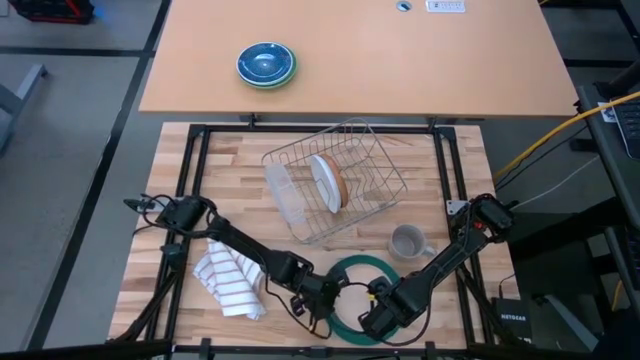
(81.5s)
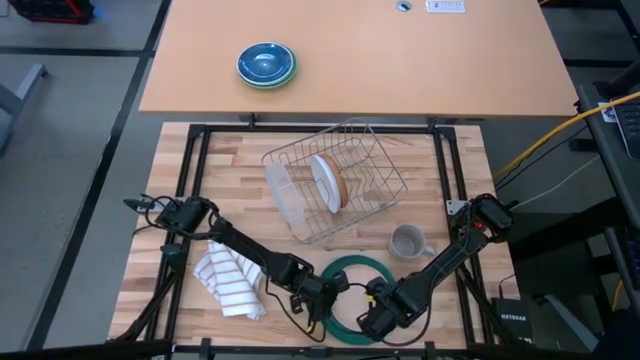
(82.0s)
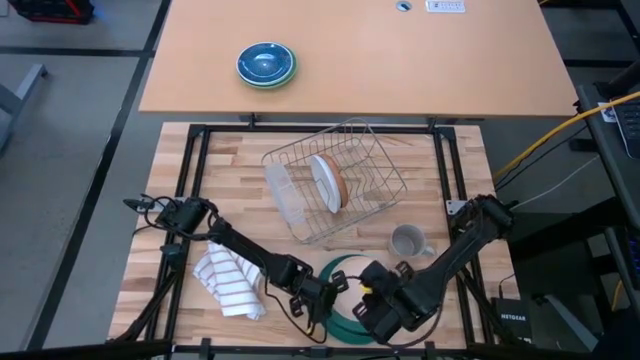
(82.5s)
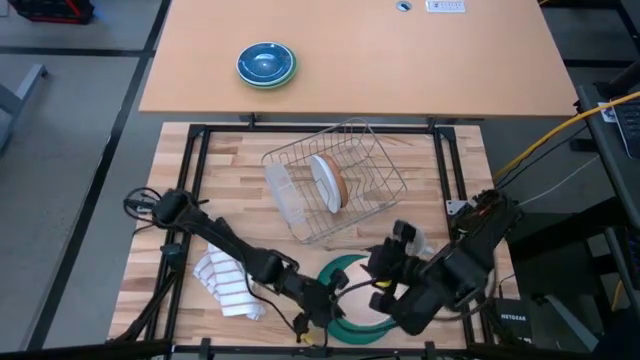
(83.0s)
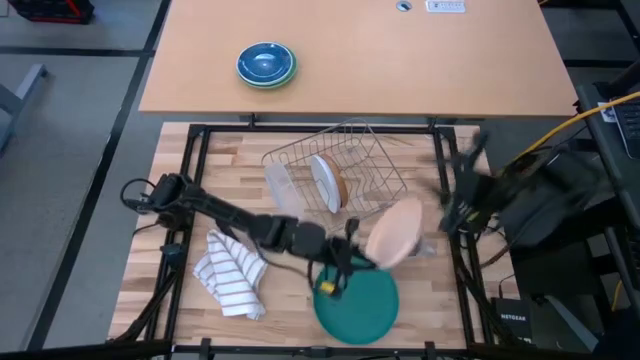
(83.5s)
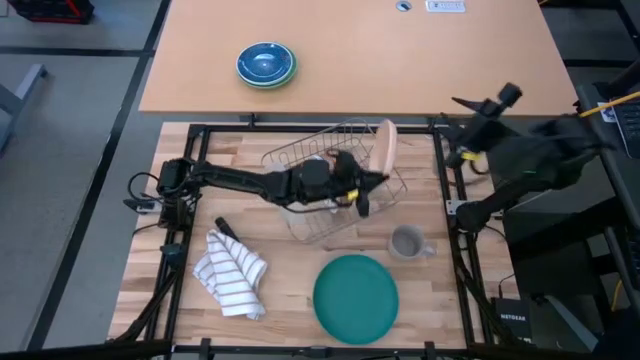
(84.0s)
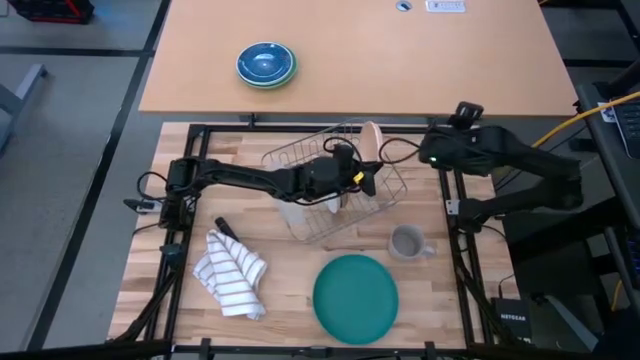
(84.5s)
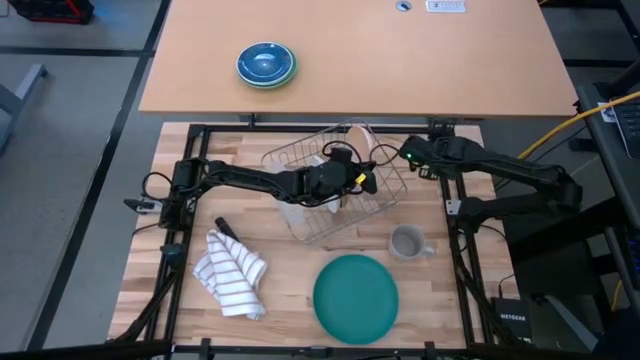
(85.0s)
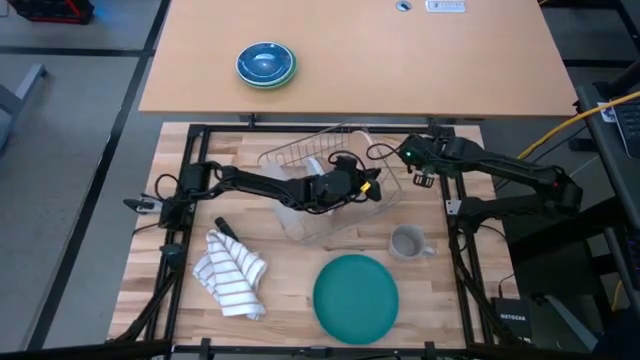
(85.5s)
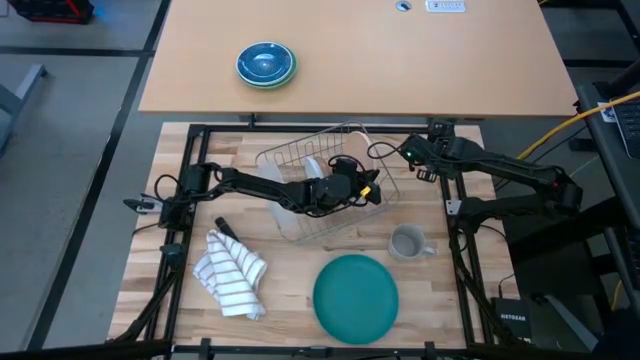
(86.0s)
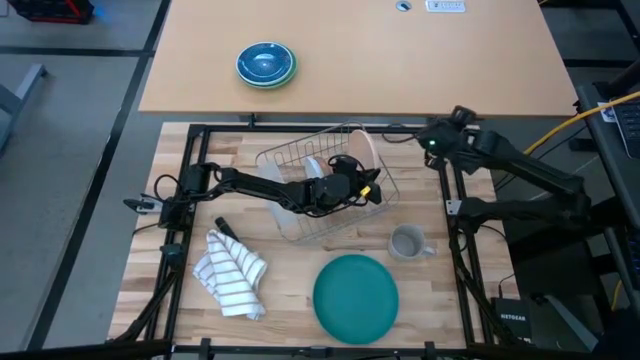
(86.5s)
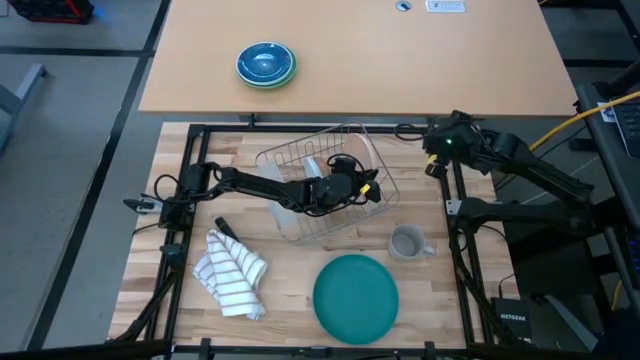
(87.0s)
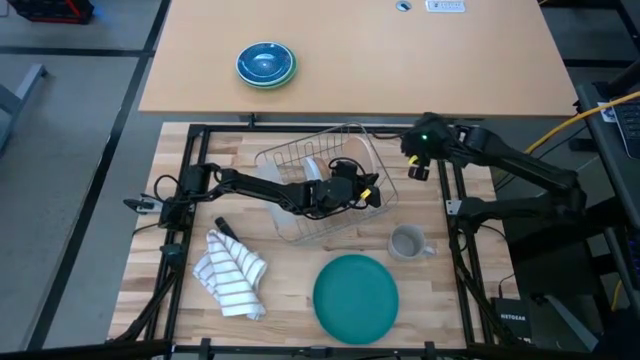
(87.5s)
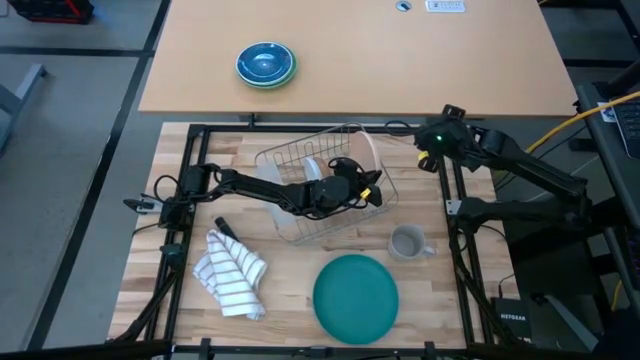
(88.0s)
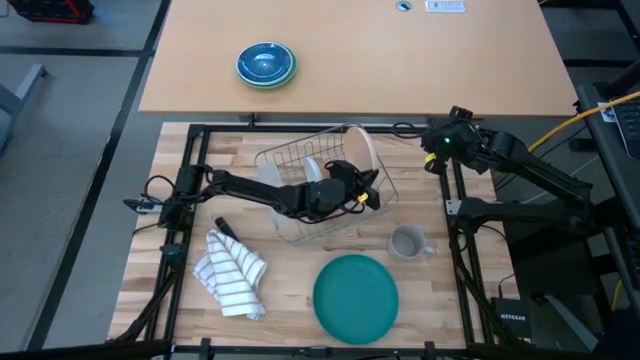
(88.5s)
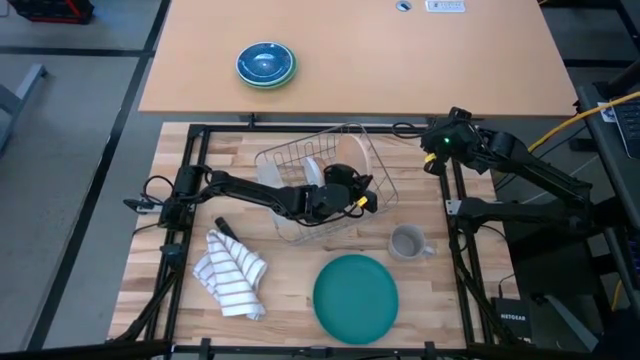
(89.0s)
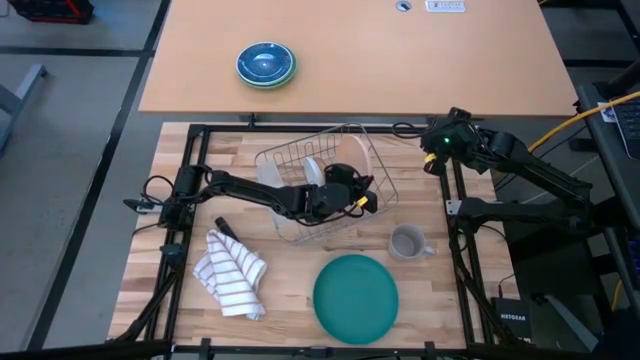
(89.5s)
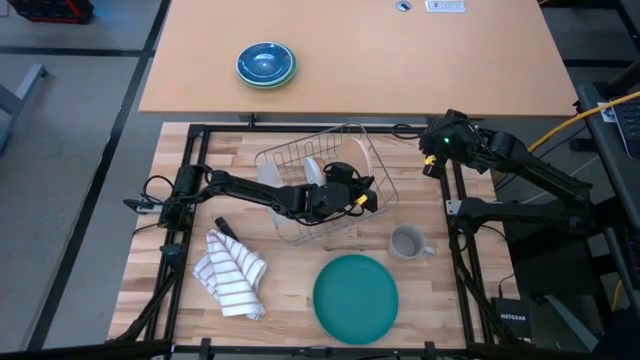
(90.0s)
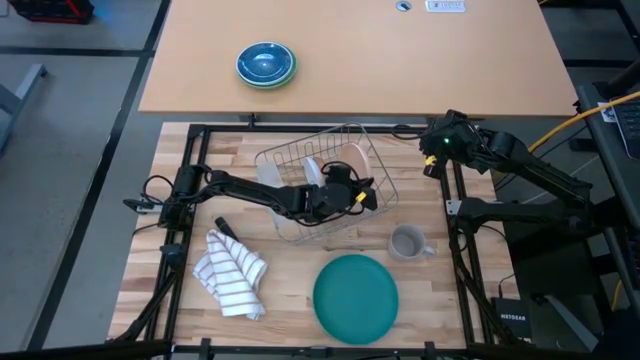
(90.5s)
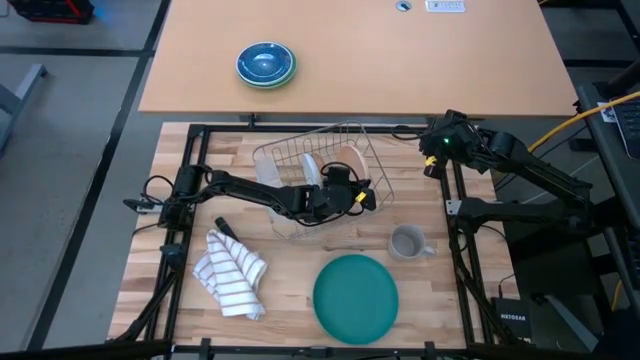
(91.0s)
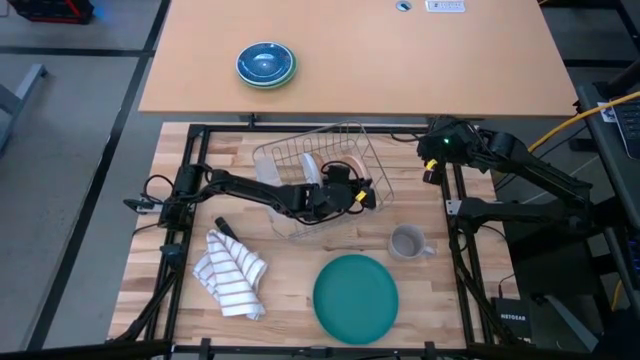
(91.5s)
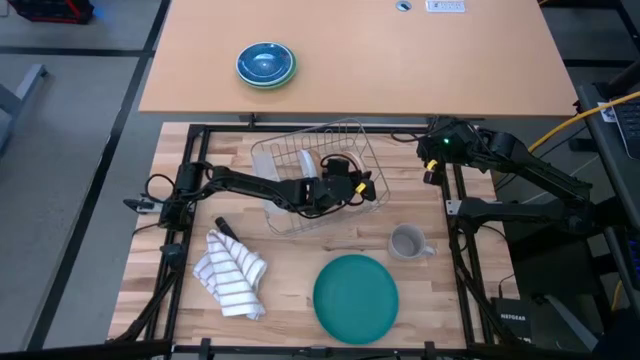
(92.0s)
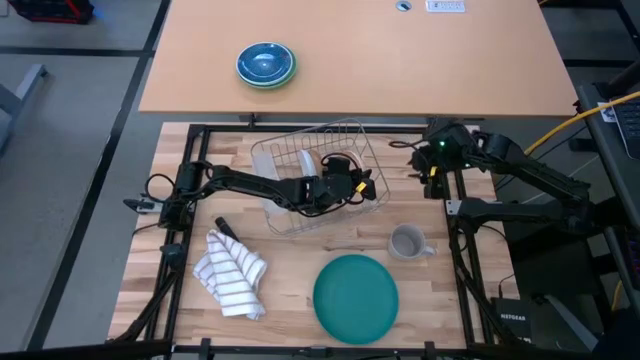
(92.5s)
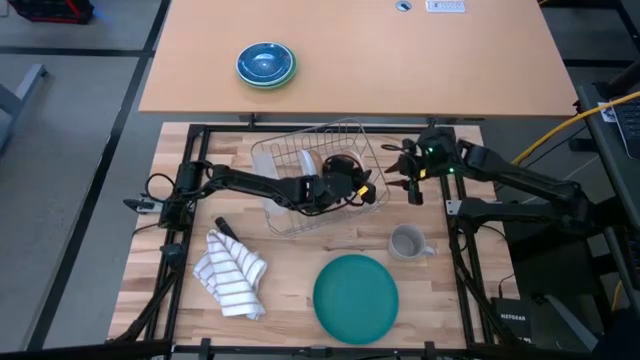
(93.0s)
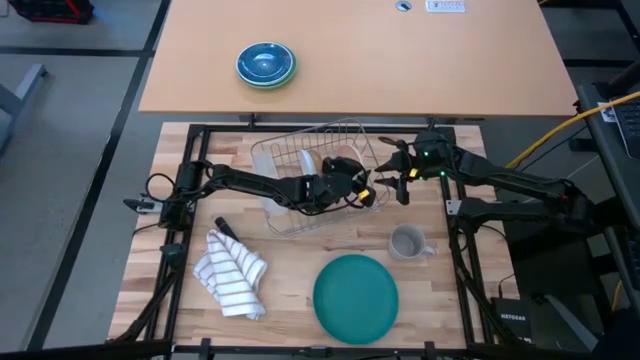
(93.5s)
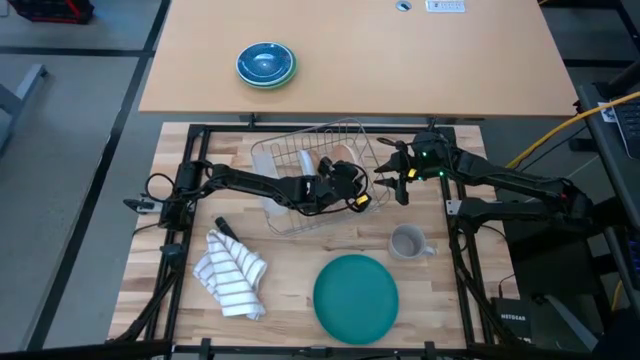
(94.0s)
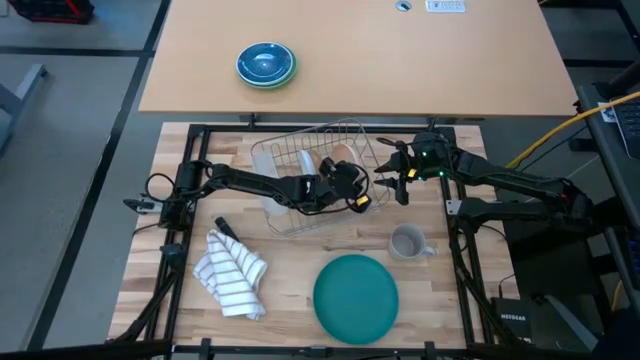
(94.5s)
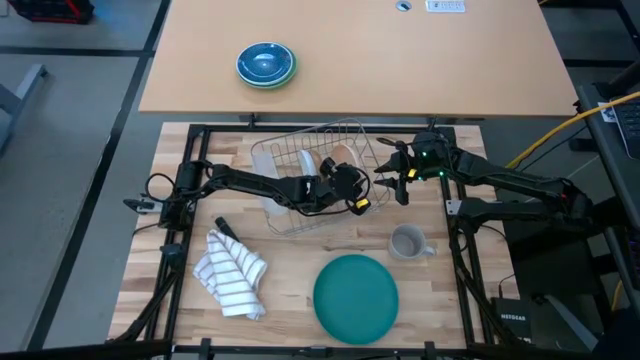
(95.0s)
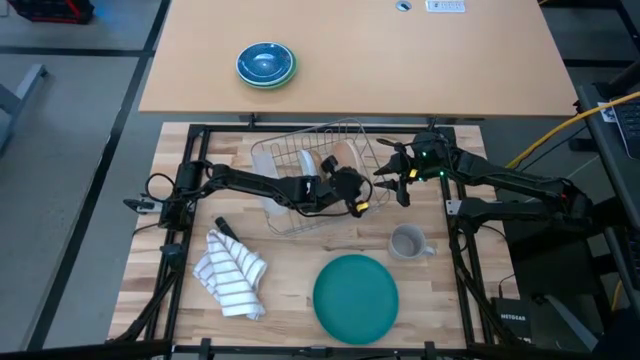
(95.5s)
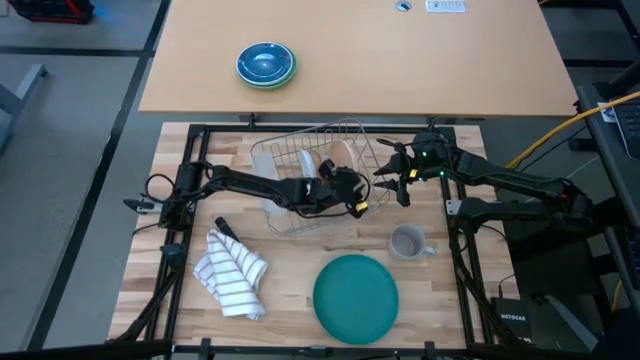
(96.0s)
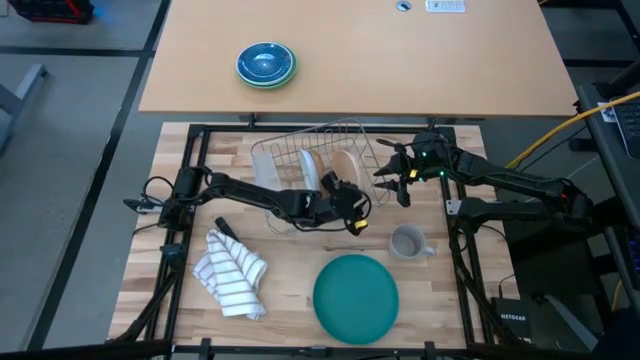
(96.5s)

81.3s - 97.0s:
Task: Sort dishes
Put the pink plate in the dish rack

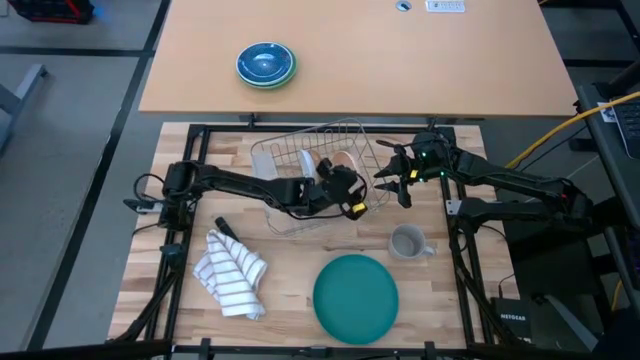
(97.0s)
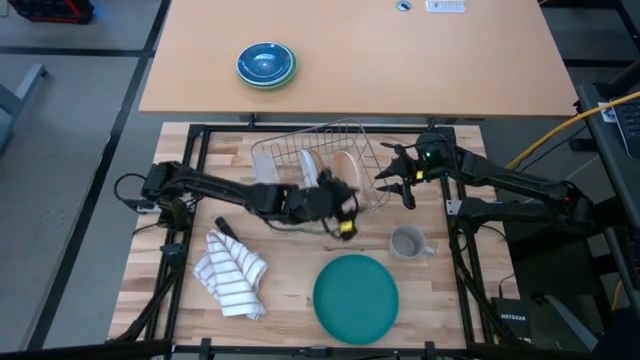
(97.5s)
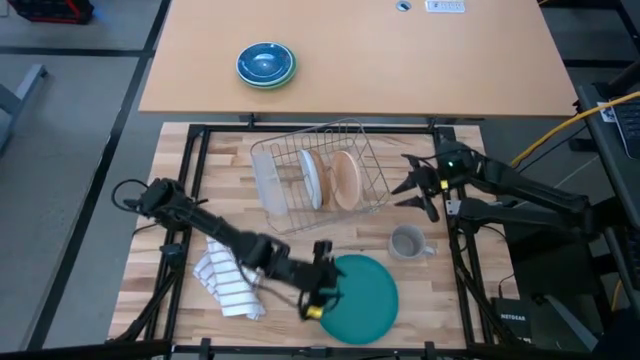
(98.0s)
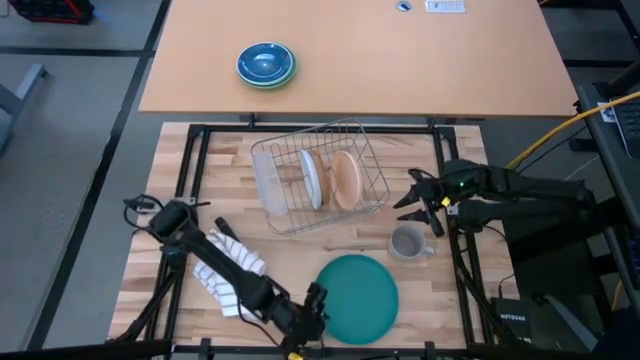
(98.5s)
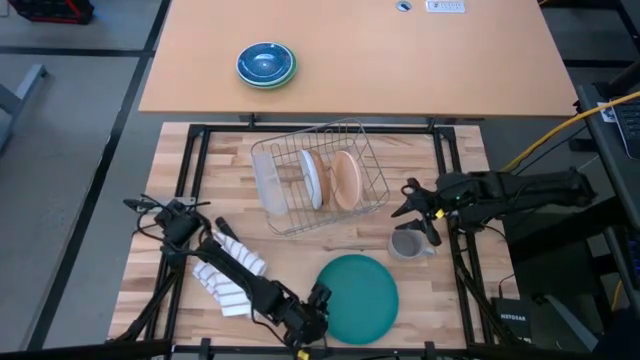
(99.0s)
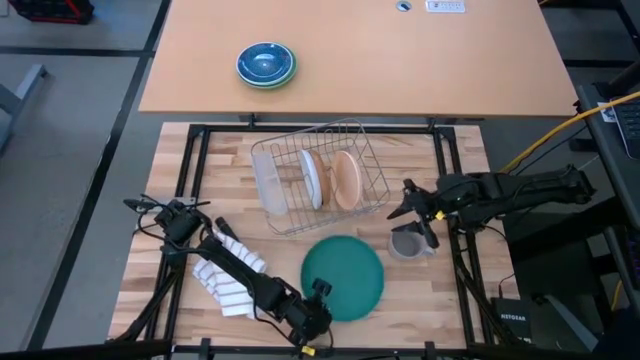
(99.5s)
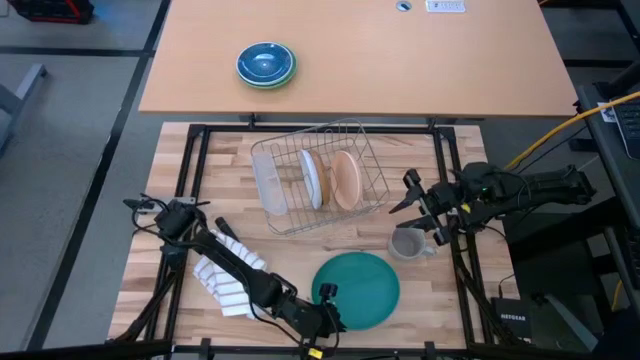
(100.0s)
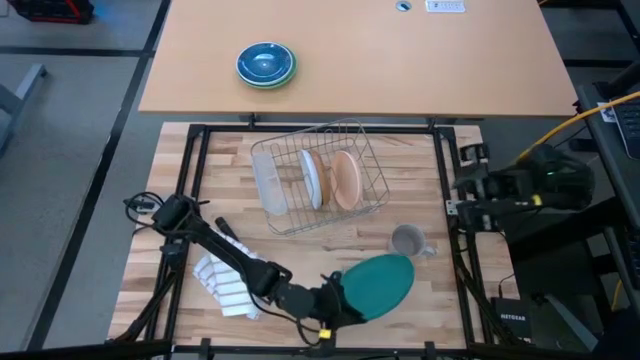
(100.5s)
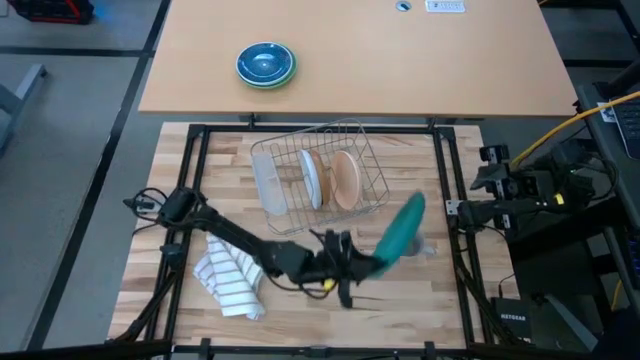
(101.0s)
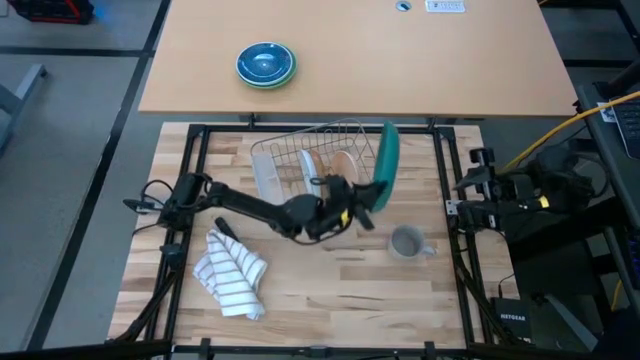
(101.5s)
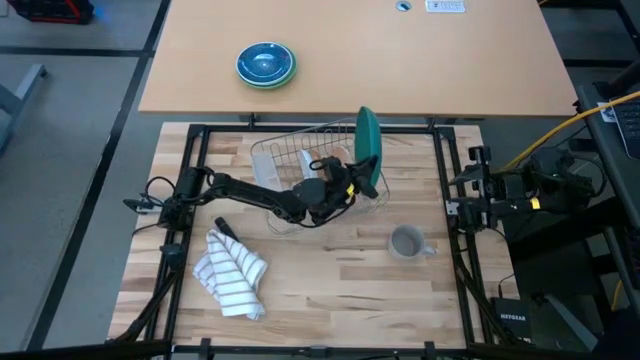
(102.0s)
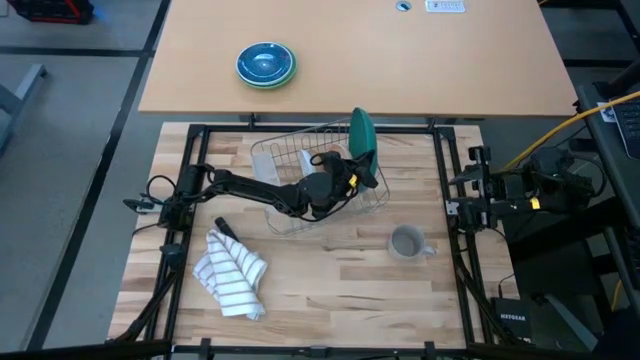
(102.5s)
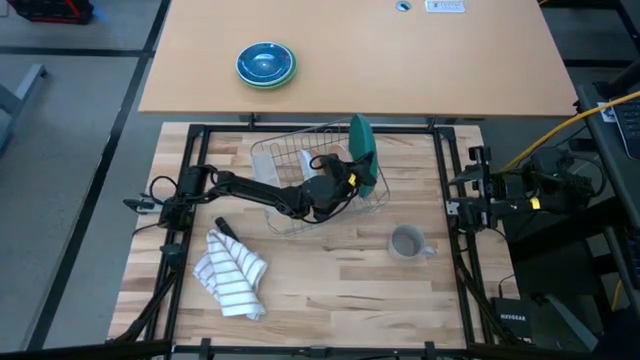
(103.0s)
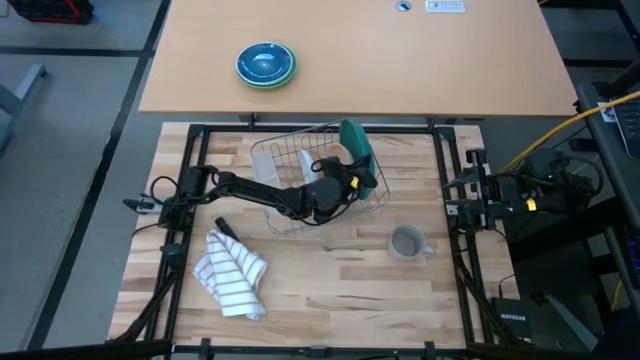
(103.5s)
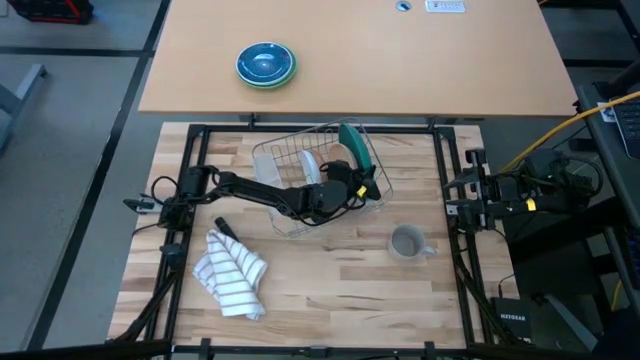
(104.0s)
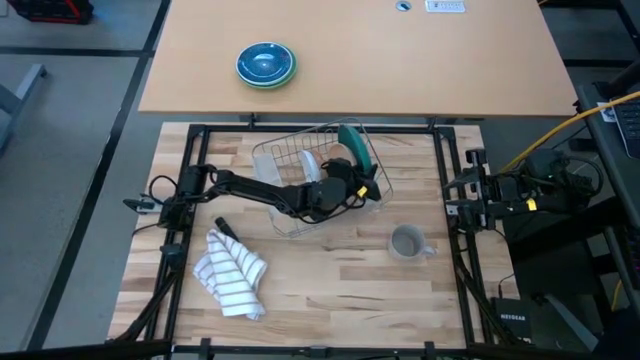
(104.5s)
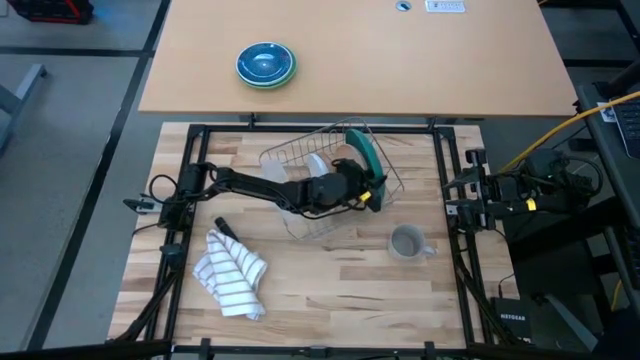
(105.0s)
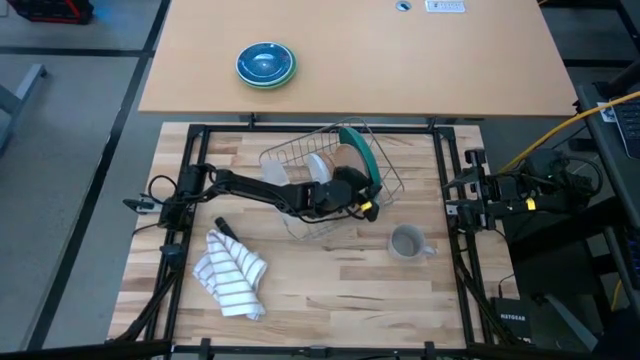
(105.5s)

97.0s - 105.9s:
Put the green plate in the dish rack
